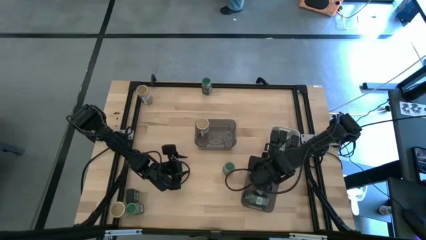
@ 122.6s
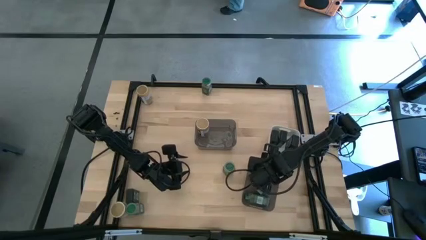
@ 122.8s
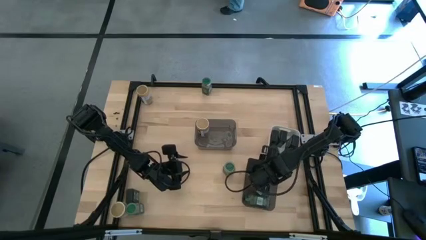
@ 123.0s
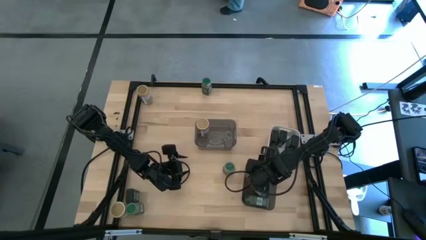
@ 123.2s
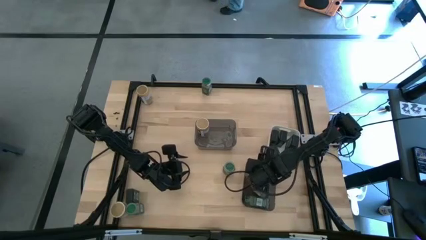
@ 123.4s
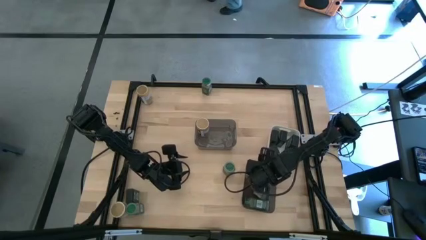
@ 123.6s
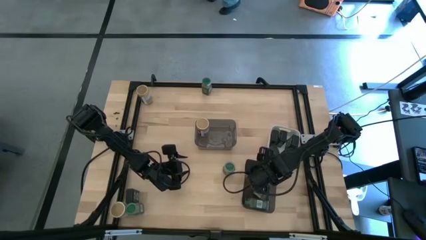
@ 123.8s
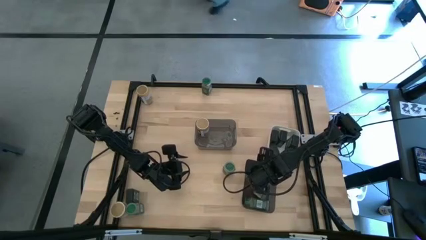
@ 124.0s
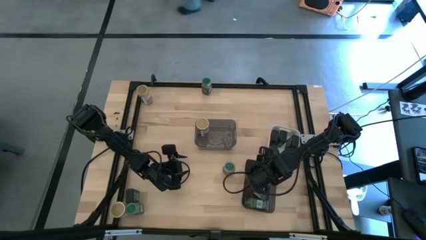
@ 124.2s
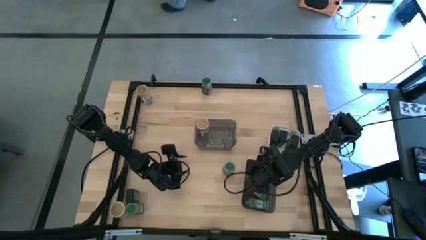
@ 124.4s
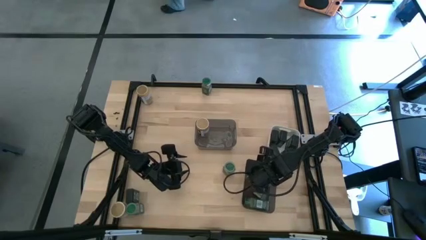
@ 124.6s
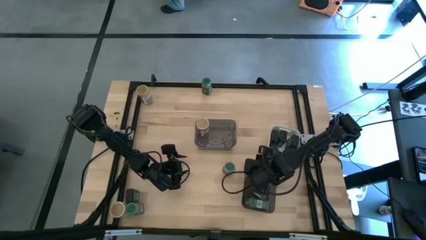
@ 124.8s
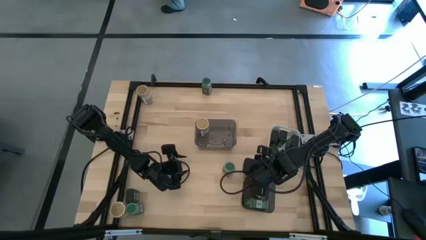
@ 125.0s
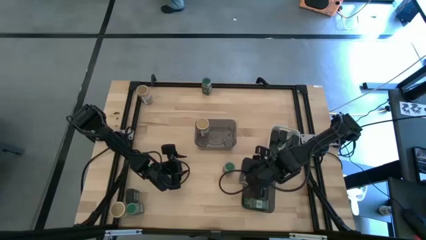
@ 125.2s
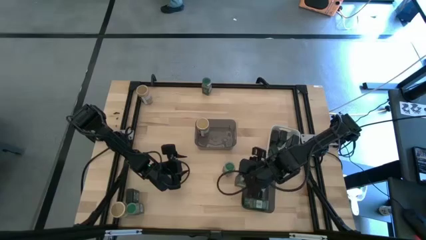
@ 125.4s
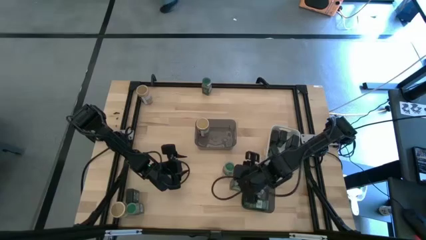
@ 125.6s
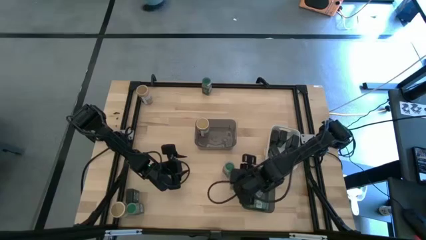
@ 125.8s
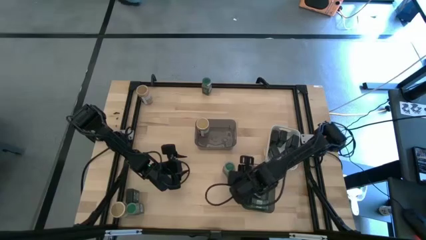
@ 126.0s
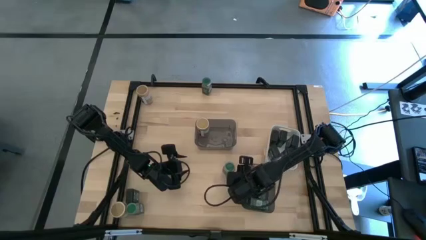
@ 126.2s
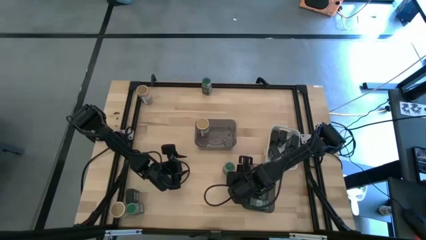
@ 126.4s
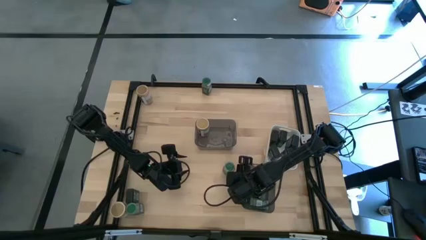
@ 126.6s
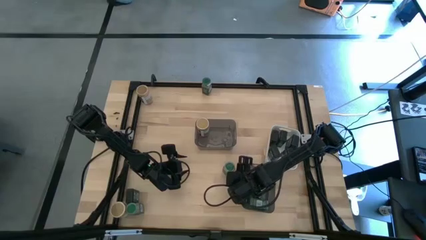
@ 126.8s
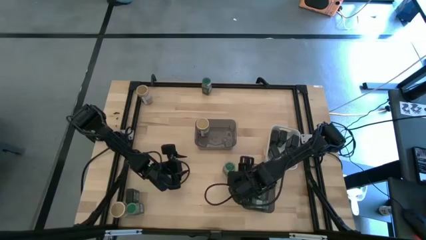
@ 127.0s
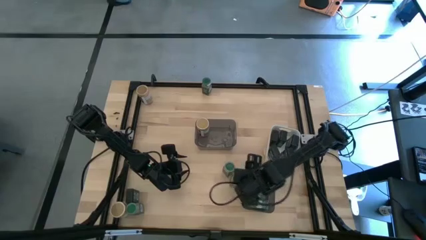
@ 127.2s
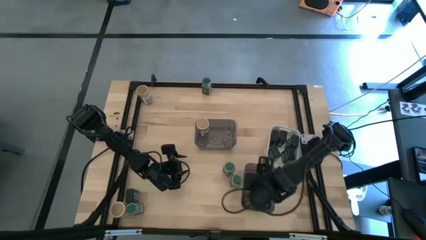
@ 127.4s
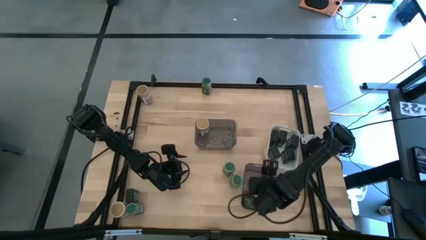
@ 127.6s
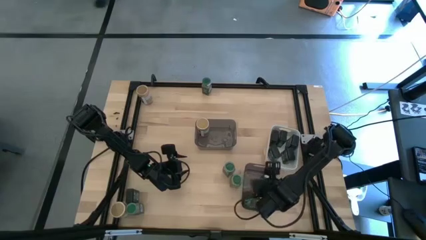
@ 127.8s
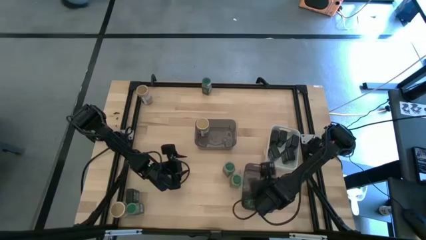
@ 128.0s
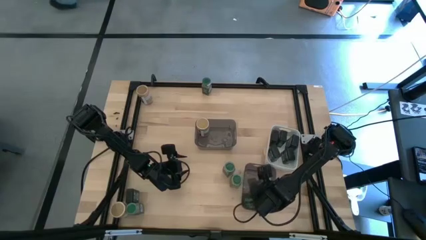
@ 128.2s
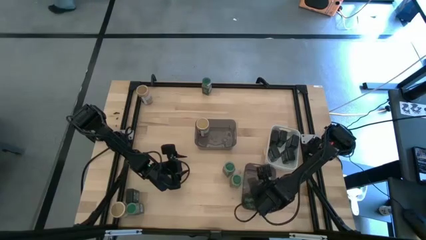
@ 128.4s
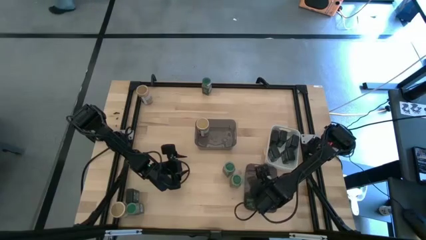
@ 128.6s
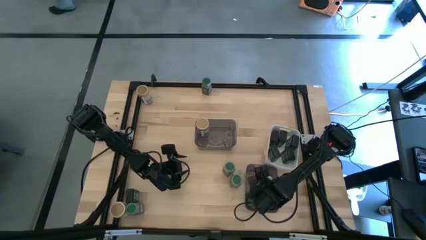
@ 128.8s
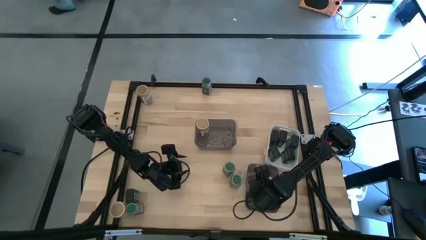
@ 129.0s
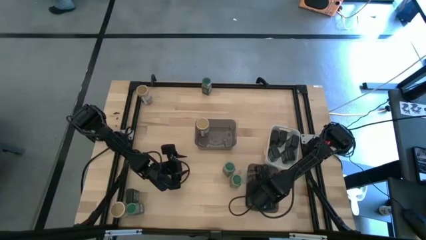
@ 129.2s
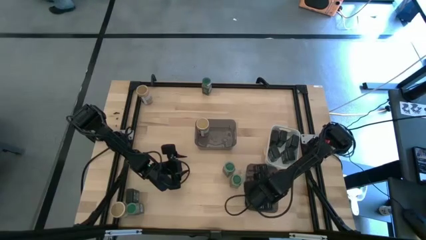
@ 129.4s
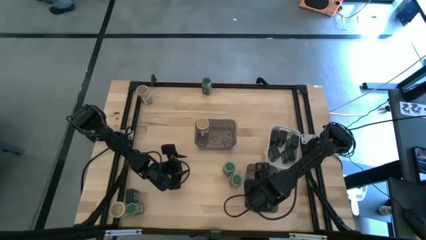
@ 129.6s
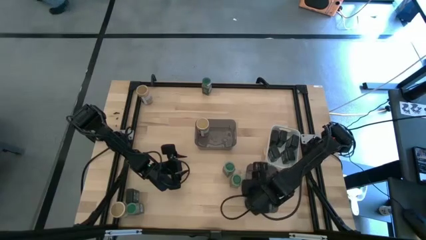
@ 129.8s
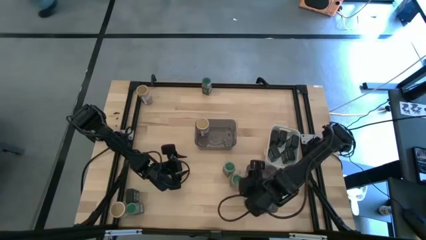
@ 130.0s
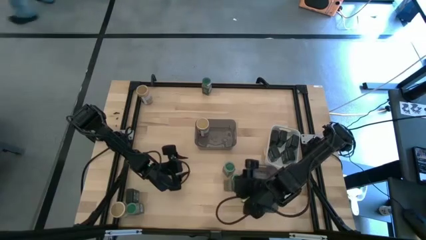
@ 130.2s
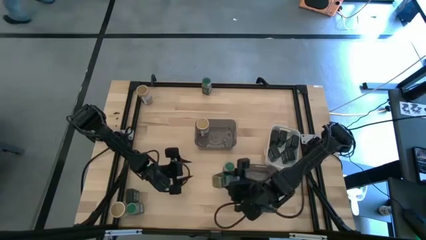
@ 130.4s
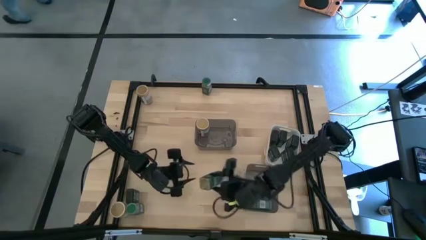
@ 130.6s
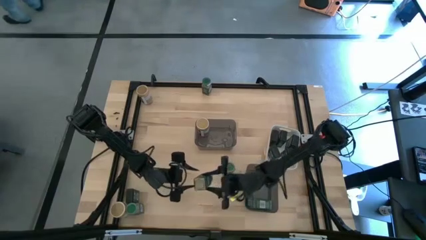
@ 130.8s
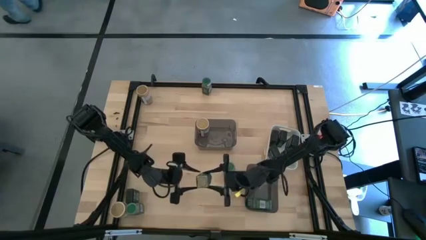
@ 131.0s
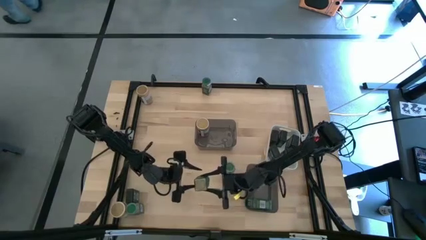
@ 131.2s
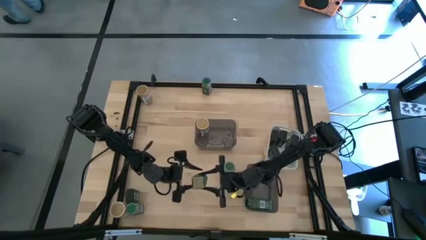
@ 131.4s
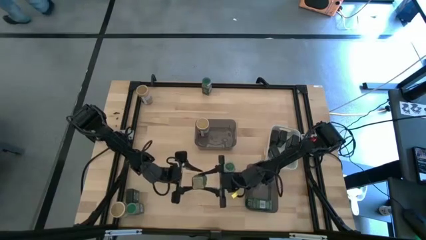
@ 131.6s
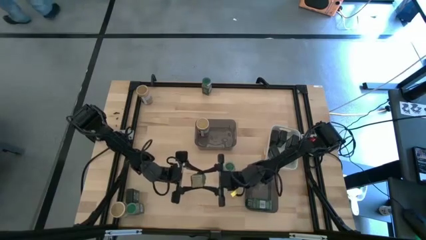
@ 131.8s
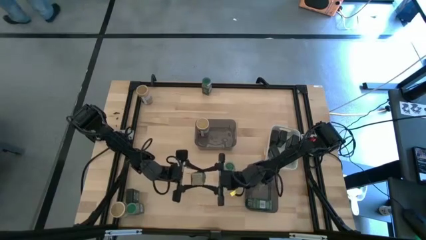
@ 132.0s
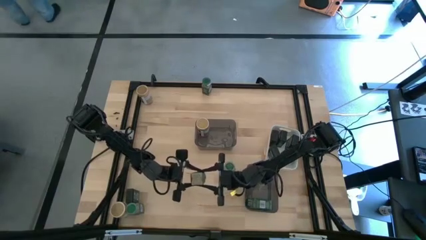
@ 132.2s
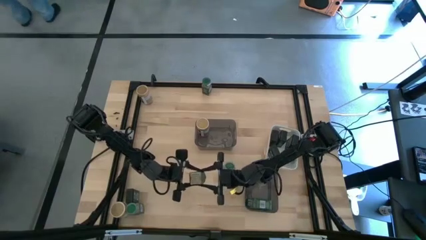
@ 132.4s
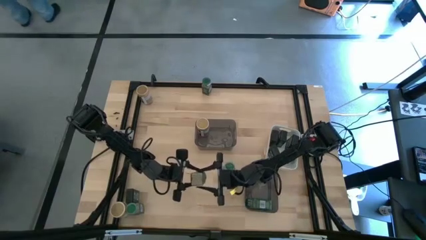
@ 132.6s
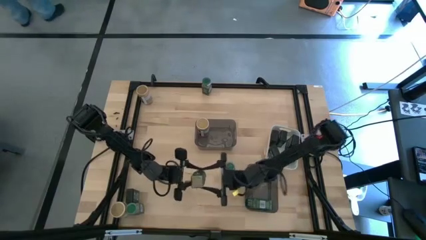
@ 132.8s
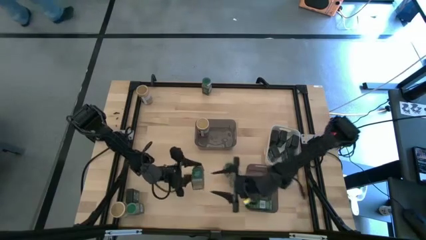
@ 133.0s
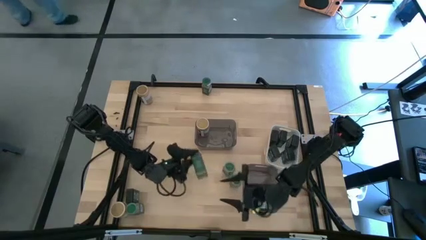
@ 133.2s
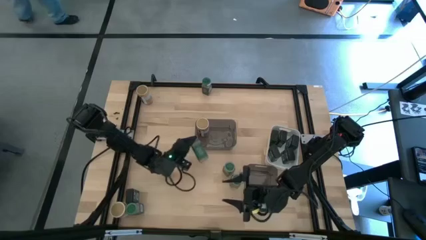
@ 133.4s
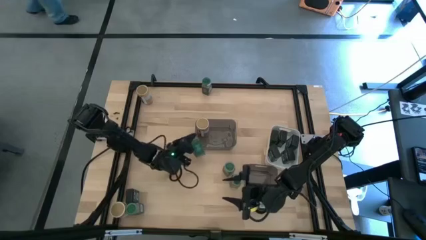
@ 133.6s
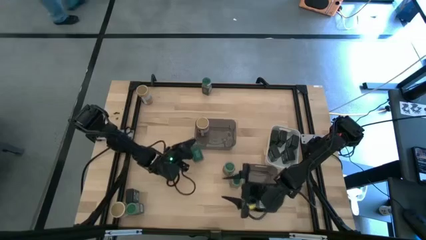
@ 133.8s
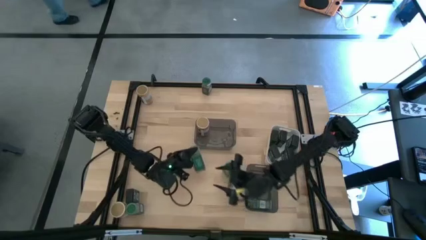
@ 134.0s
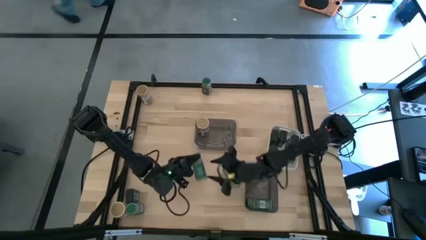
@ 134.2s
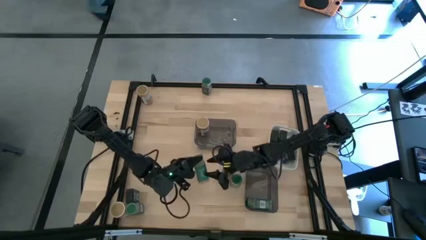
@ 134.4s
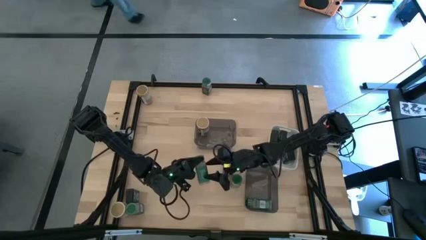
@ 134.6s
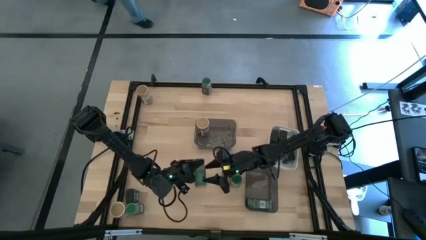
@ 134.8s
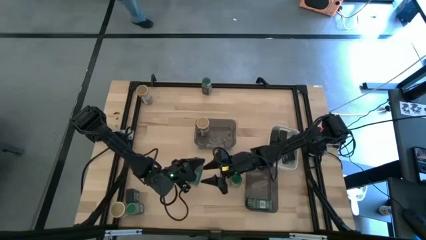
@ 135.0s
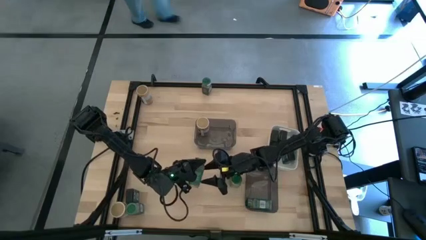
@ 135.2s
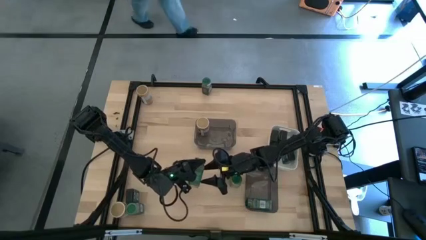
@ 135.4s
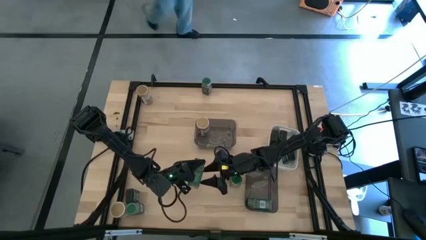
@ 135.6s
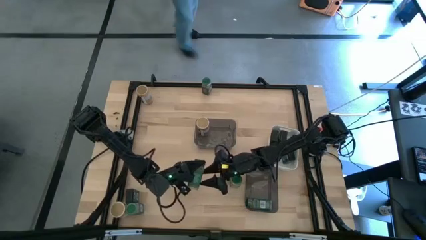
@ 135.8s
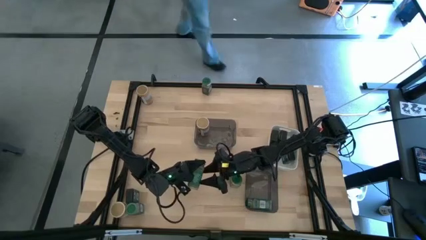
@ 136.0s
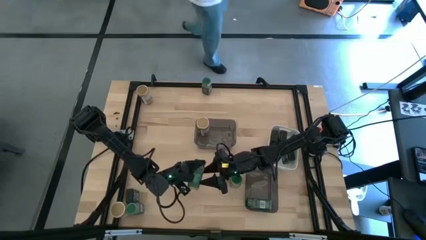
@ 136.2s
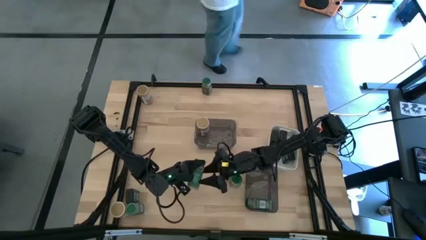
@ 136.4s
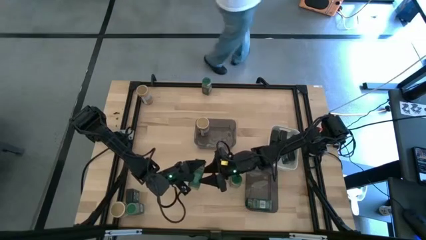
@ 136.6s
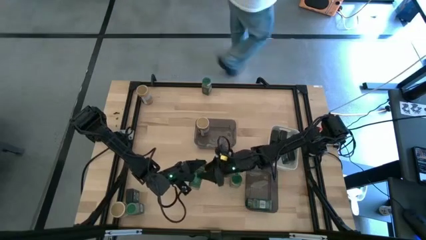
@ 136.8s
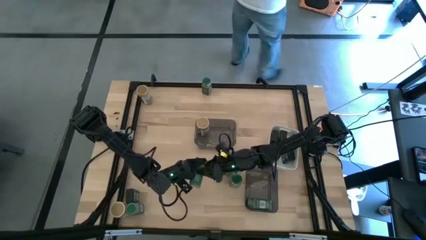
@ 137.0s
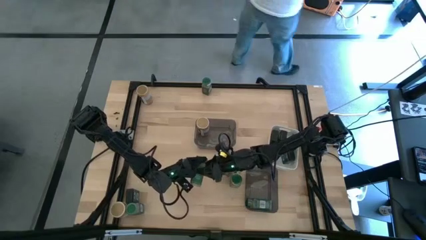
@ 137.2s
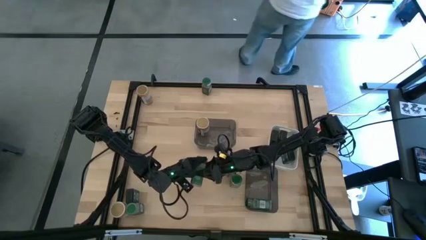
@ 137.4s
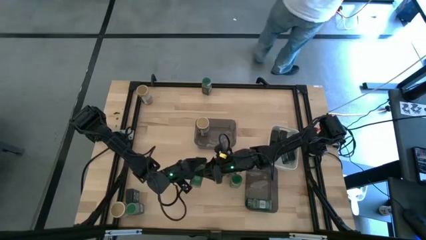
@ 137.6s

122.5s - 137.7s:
Task: Sort spices by type
Adjust the green seasoning bottles

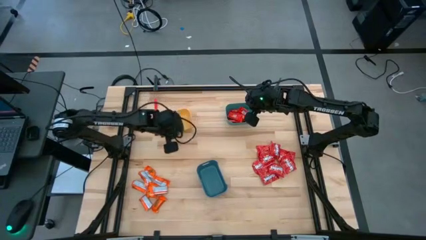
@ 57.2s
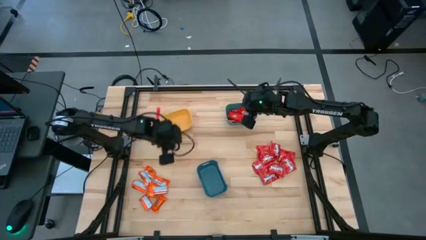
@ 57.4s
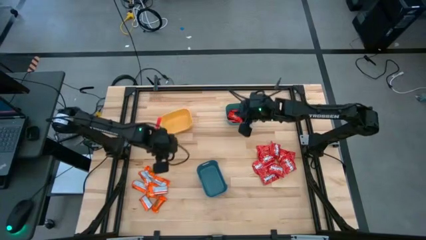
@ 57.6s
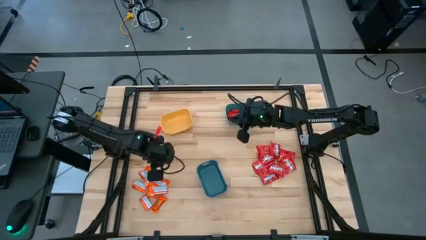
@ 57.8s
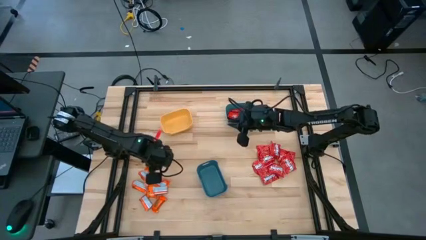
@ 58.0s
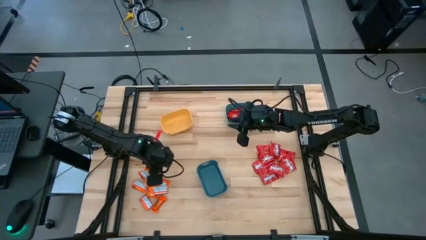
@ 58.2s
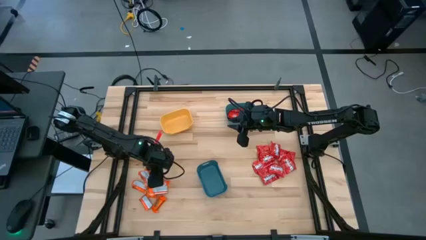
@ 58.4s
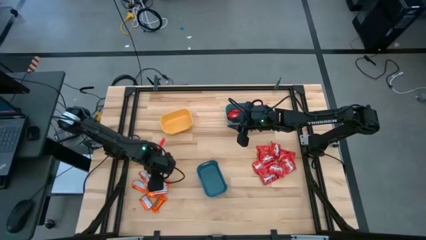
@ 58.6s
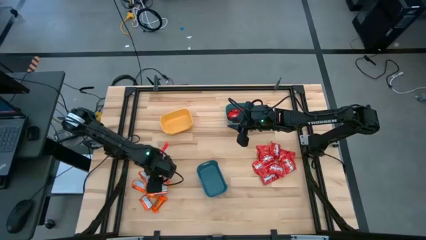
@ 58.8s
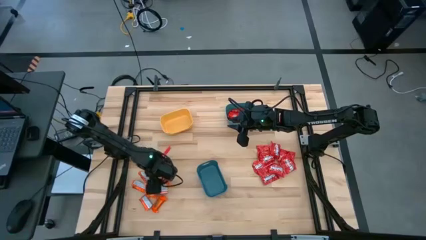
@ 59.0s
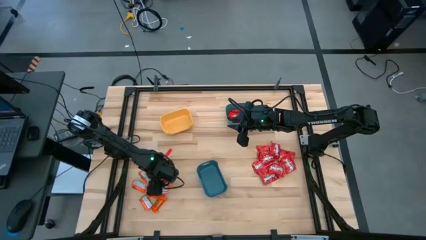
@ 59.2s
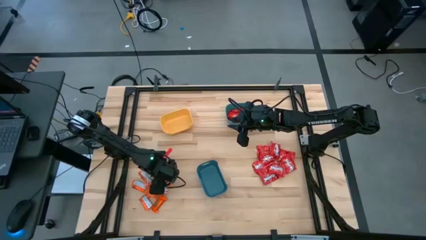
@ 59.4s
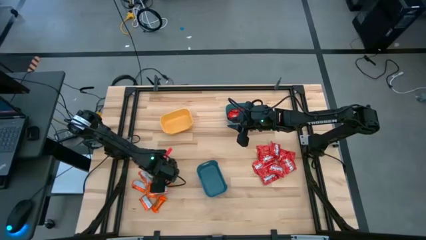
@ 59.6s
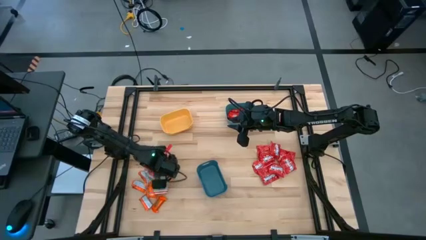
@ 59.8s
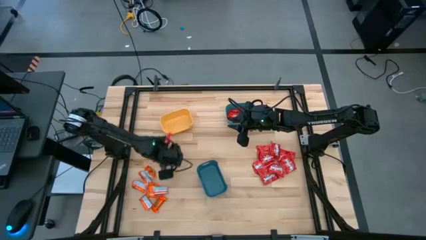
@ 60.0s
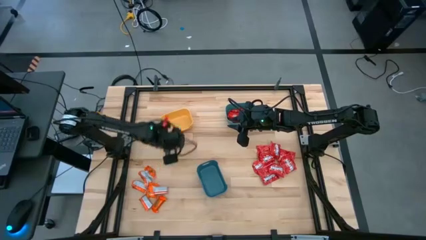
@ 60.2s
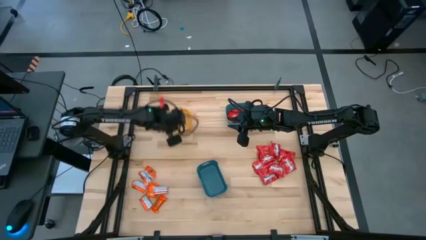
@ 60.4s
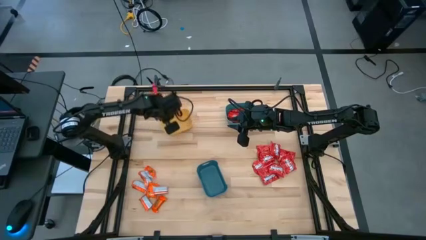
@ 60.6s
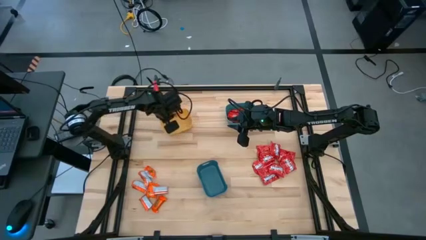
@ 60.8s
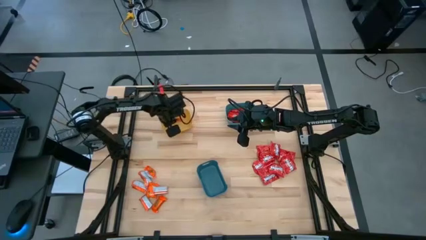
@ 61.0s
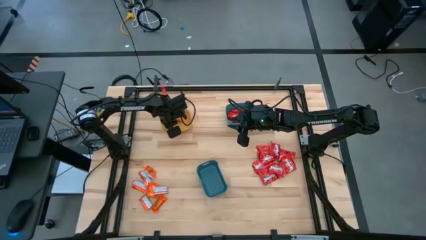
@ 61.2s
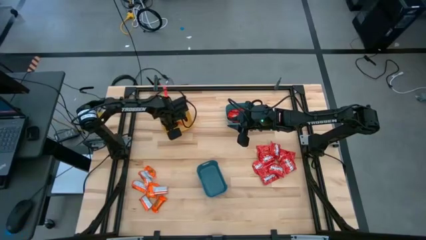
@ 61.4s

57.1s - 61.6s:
Task: Sort candy
Put the orange chocolate bar into the yellow bin
